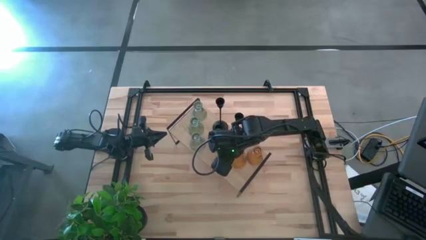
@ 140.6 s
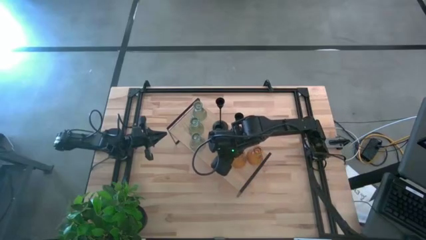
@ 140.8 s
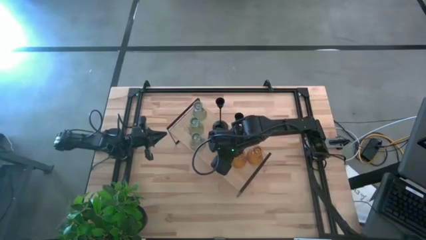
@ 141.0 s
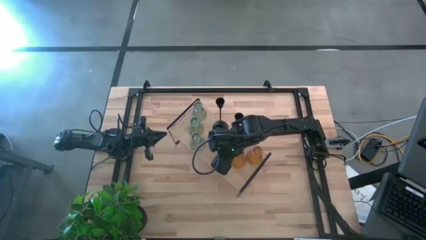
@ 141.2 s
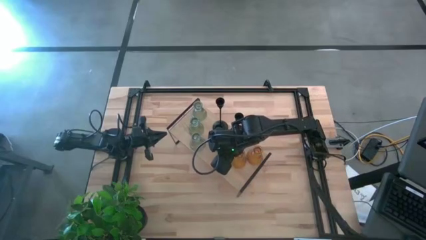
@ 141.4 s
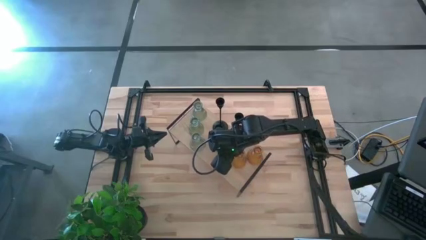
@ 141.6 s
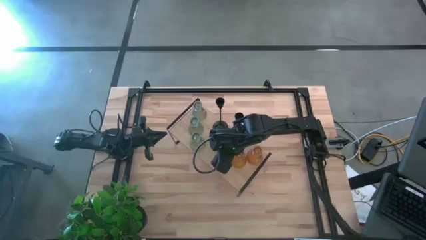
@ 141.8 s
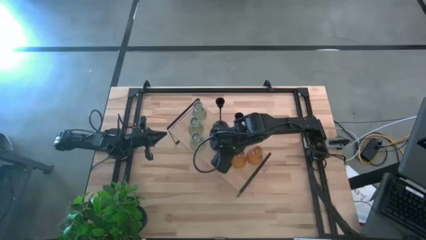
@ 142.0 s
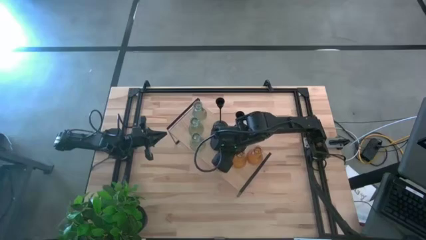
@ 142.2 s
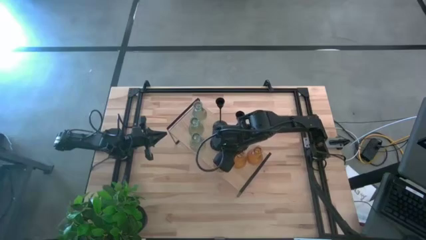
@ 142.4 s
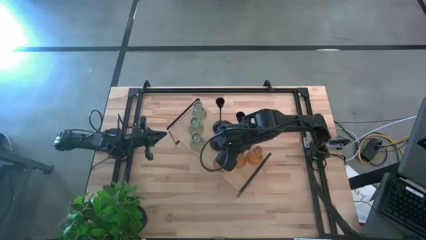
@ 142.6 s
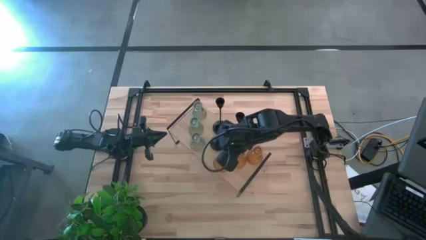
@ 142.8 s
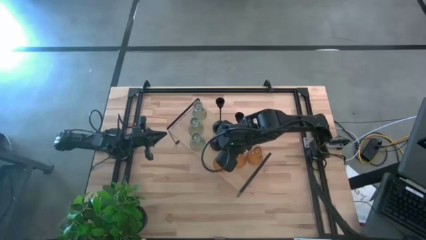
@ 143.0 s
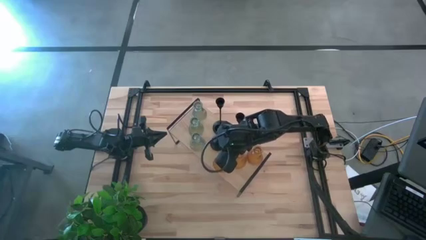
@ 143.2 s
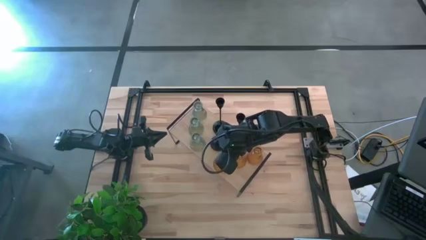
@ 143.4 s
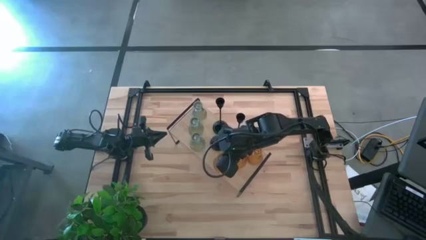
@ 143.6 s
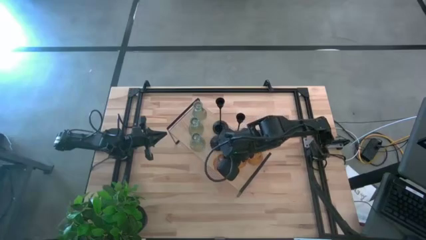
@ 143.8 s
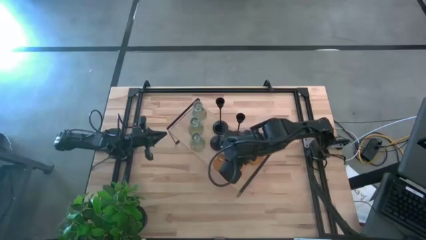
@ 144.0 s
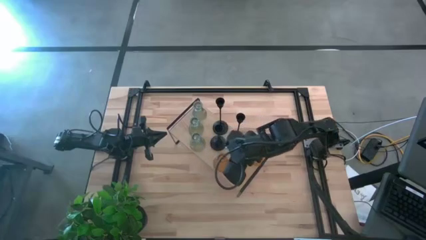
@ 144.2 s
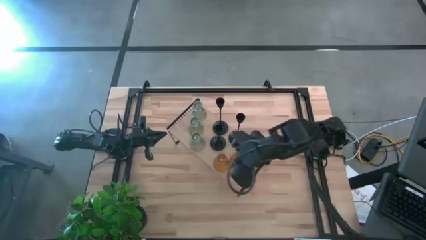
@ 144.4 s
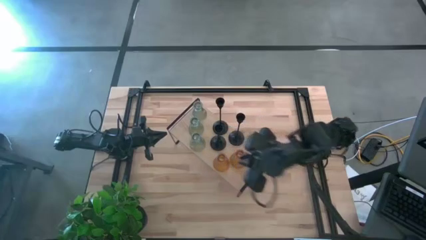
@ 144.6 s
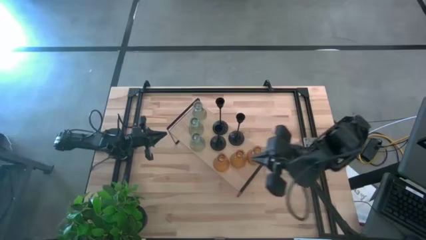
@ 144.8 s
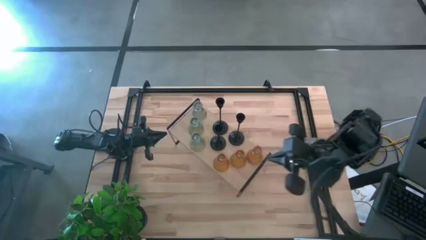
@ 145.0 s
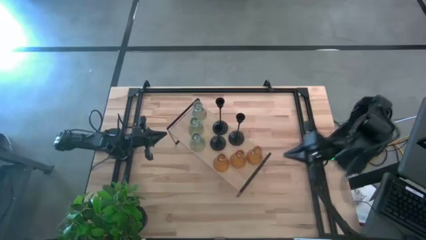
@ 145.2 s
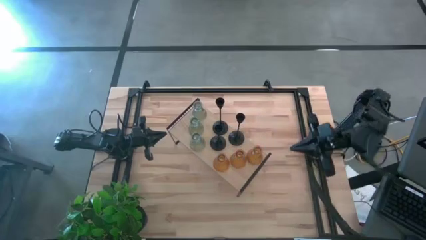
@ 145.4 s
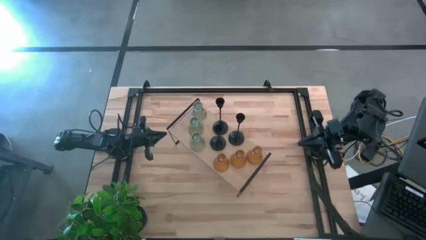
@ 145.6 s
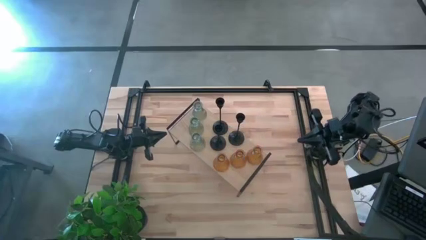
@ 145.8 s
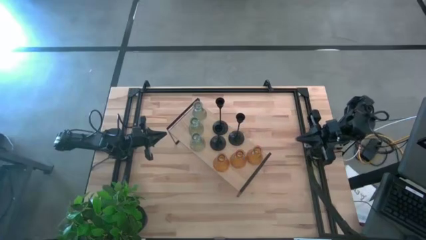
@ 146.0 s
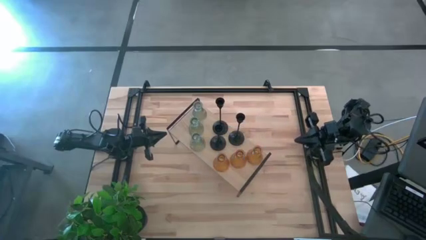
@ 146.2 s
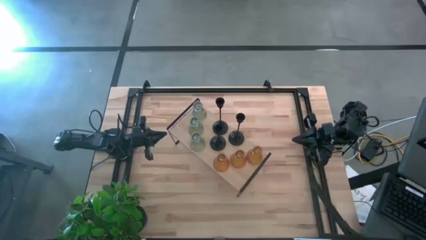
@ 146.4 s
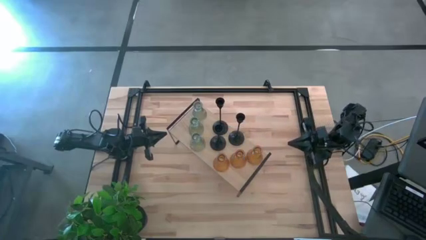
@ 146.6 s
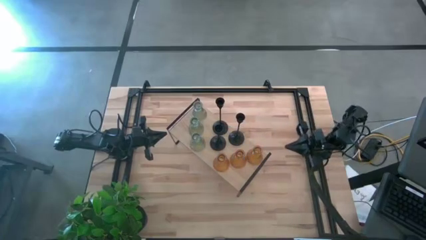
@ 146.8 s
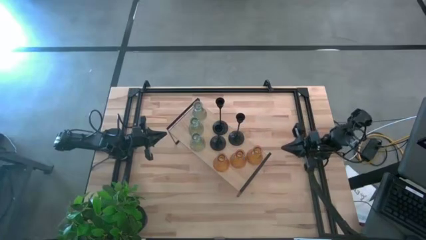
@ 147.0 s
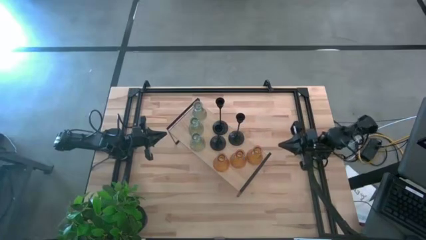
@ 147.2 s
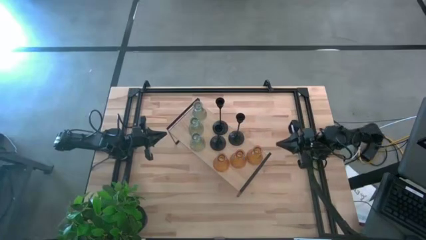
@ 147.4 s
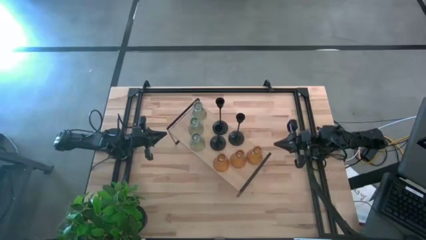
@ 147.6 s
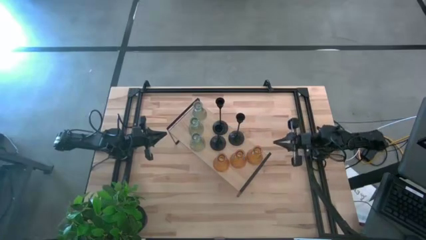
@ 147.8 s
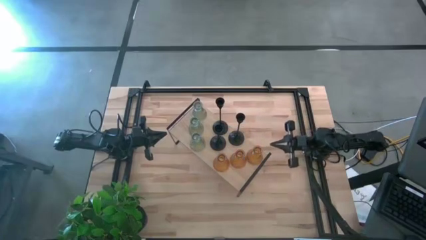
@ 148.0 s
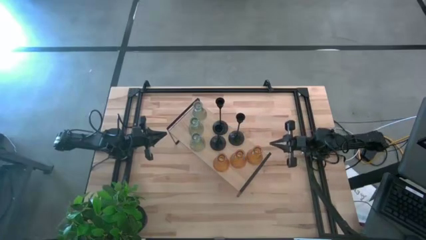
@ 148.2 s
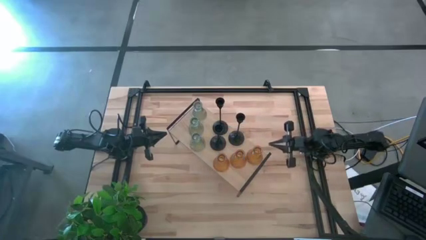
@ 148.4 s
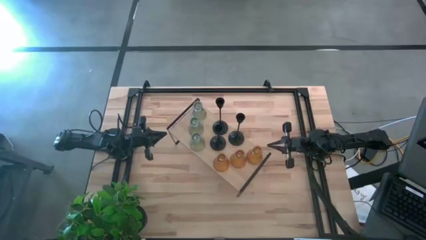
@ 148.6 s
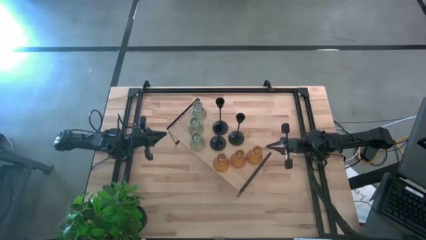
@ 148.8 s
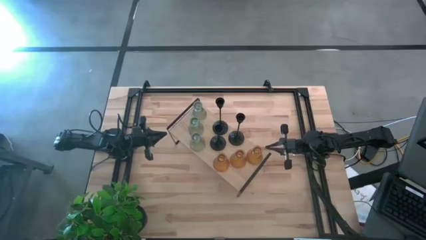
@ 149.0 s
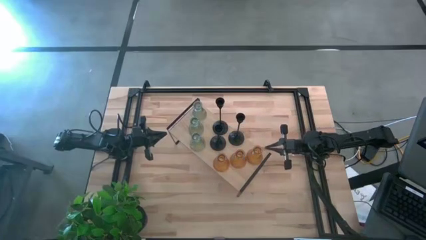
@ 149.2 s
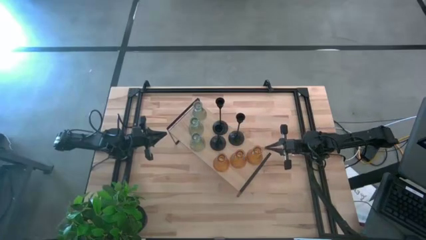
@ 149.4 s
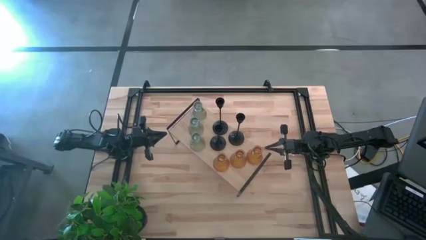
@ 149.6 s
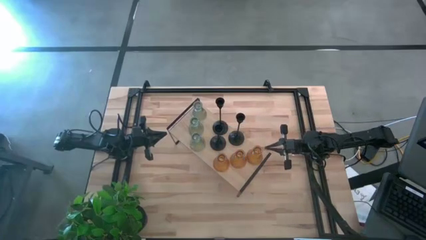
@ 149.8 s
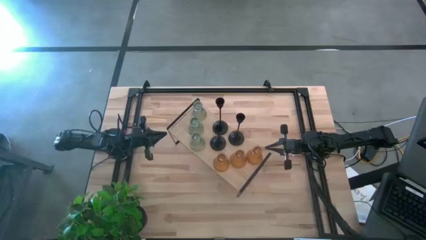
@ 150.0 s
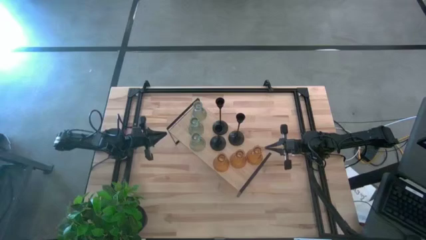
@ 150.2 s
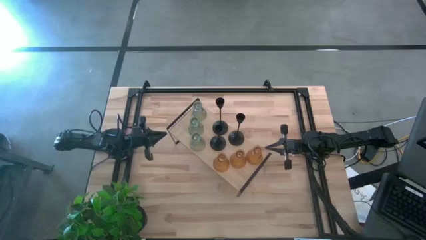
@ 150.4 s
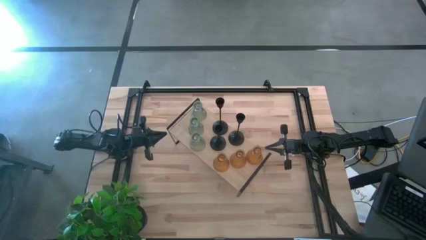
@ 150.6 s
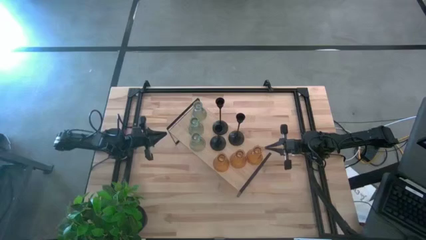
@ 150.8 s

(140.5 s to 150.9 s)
Task: Pick & Place candle stick holders
Return to Home Position

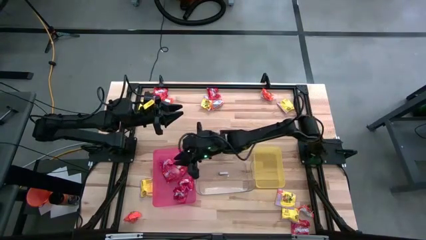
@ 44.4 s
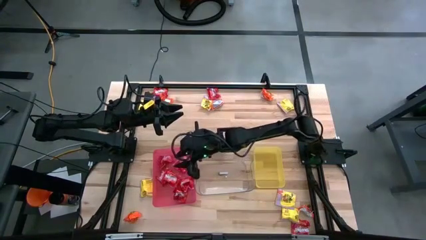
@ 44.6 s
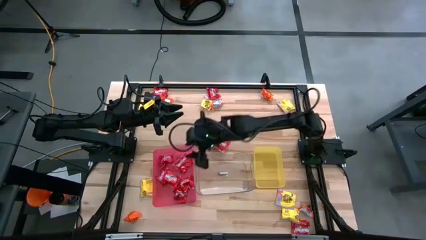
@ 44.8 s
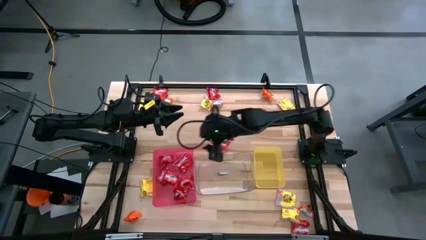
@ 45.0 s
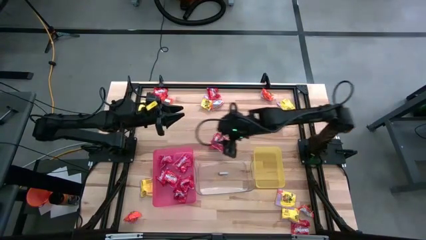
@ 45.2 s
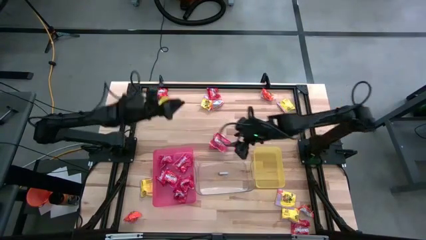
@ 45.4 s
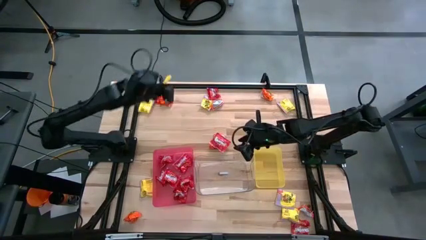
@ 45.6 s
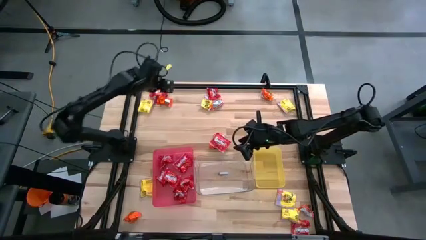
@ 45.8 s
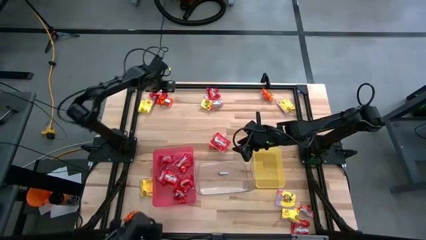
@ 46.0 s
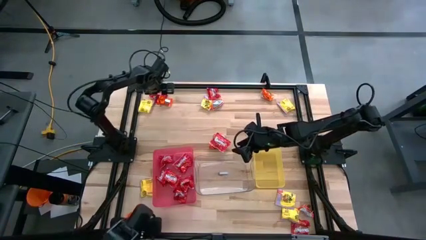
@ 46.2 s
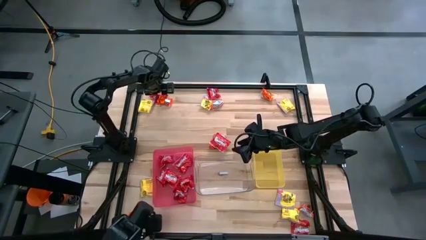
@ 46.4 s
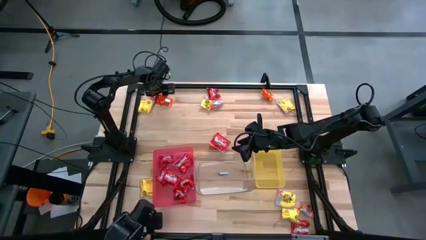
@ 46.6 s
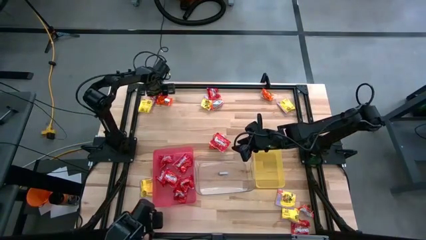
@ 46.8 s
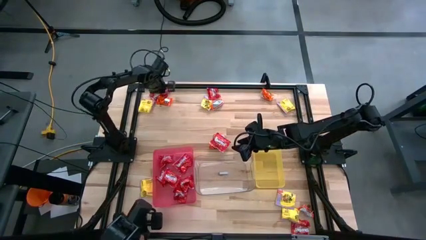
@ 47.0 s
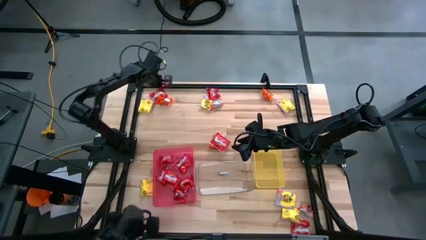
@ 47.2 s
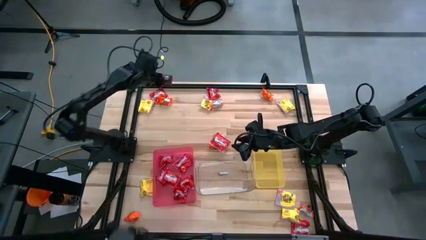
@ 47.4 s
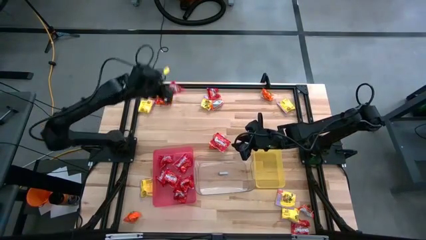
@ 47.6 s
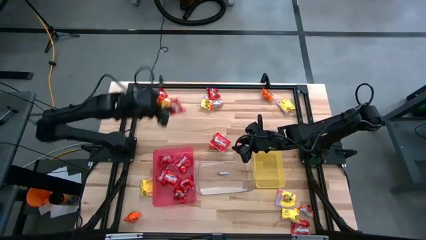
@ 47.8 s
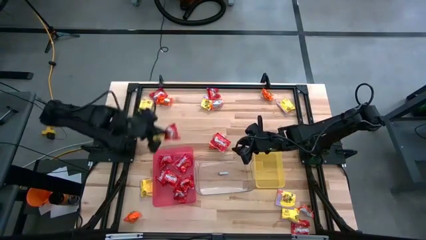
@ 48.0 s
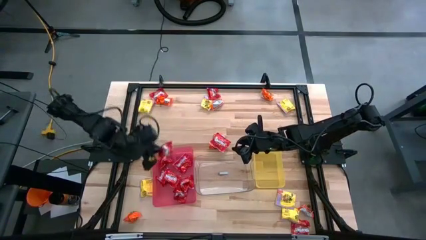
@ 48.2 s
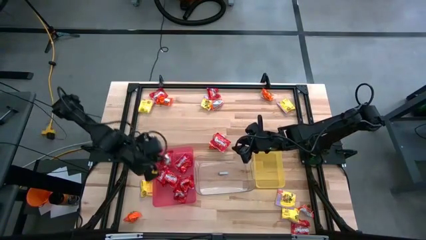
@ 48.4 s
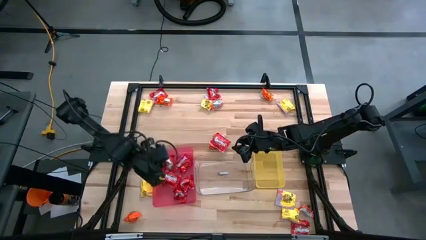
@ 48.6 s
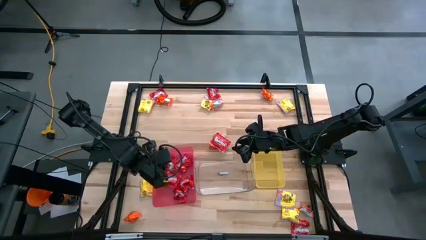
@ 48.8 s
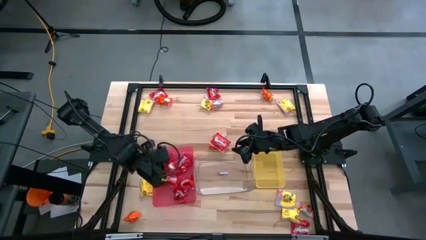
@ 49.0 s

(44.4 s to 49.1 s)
Task: Sort candy
Put the red candy into the red bin

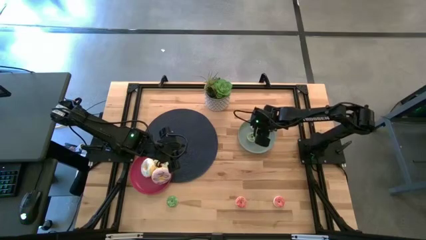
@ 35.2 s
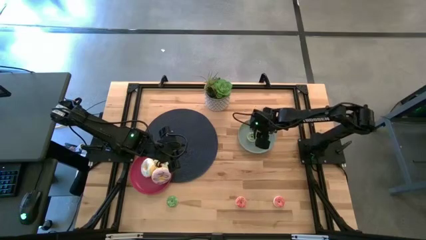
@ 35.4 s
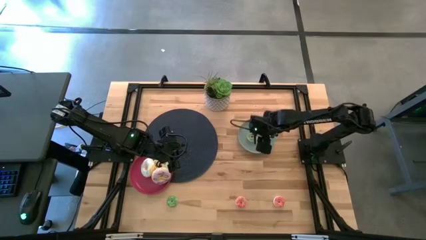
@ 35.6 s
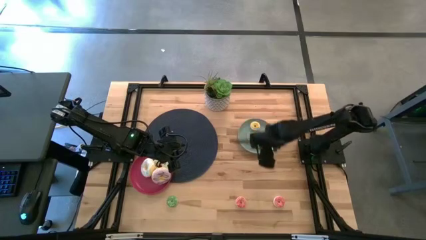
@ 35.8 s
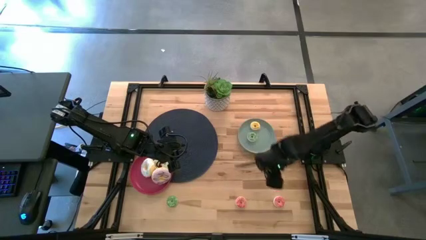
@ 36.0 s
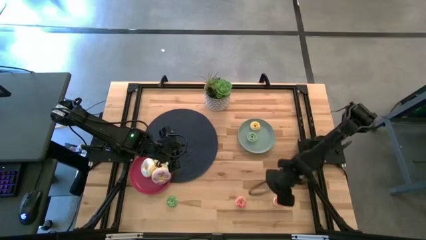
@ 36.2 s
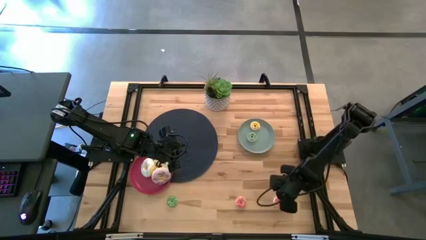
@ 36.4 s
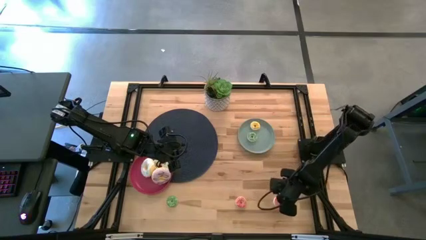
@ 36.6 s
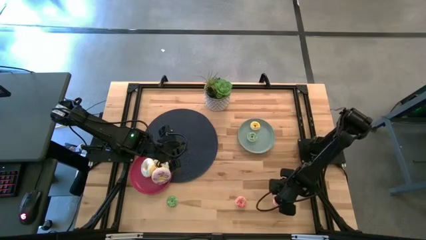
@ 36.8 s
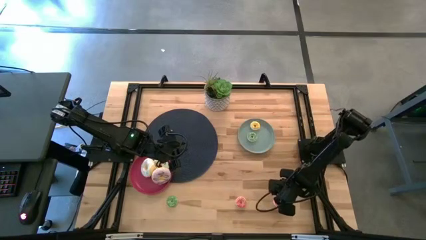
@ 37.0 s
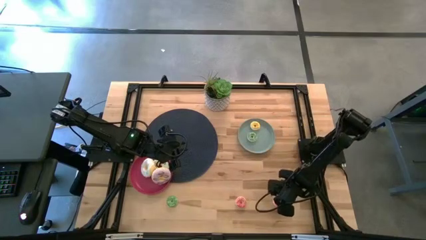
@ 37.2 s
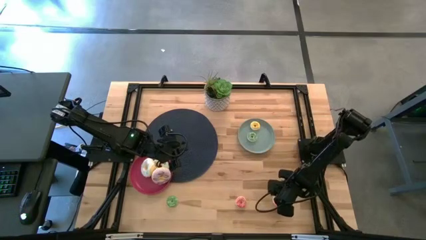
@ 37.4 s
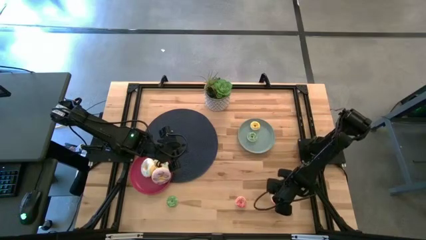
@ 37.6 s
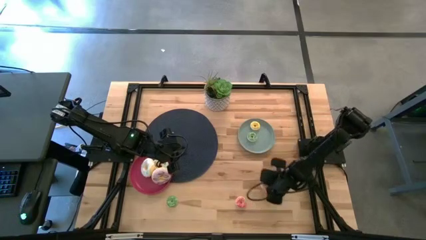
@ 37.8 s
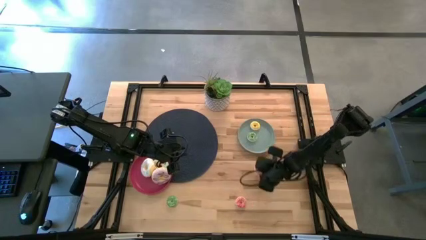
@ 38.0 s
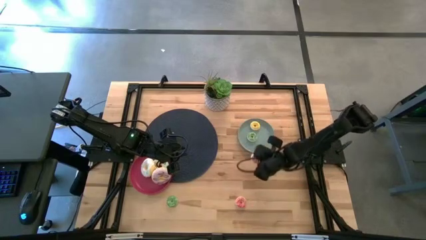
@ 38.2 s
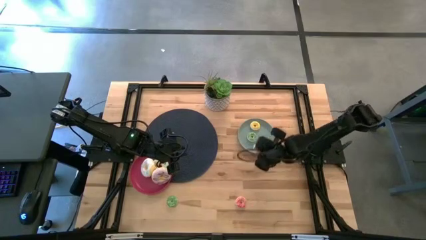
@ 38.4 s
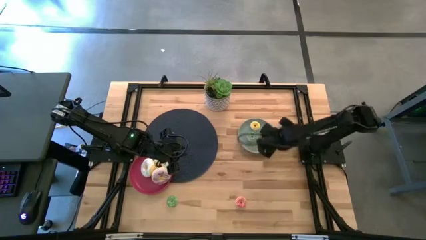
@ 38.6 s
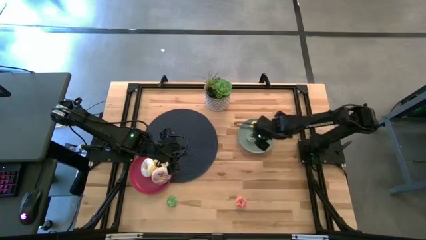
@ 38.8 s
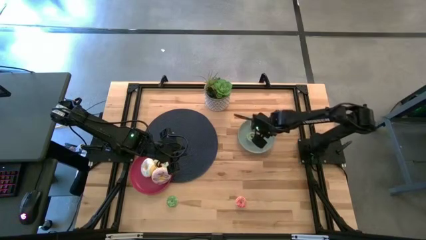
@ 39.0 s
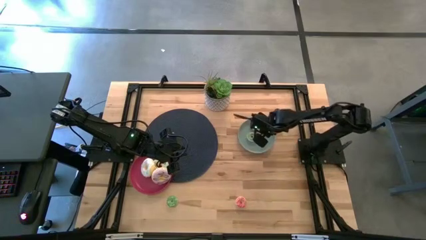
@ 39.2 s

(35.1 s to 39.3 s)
Task: Pick & Place donuts
Put the right small pink donut on the blue plate
